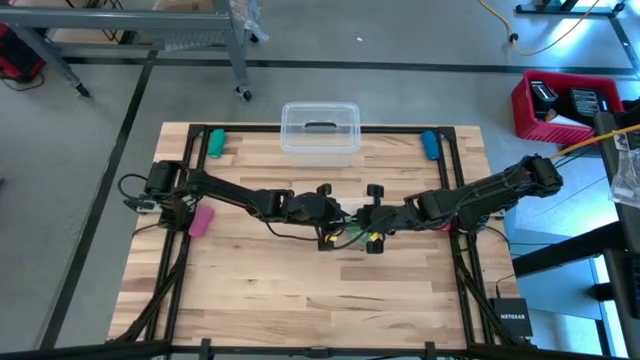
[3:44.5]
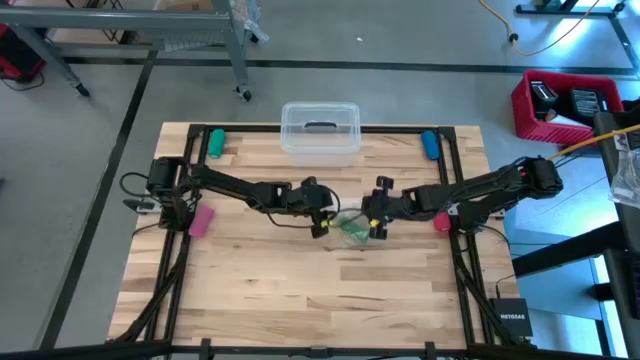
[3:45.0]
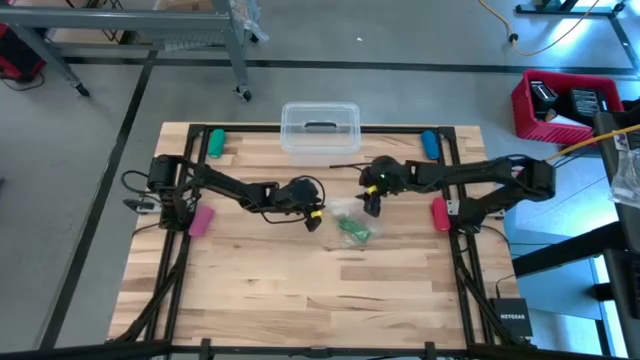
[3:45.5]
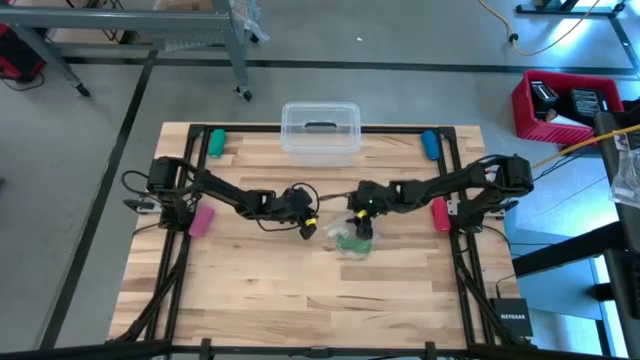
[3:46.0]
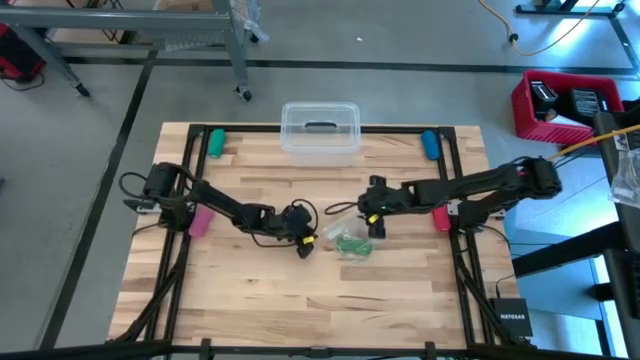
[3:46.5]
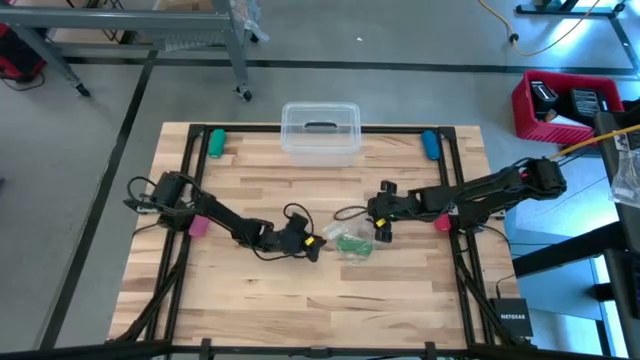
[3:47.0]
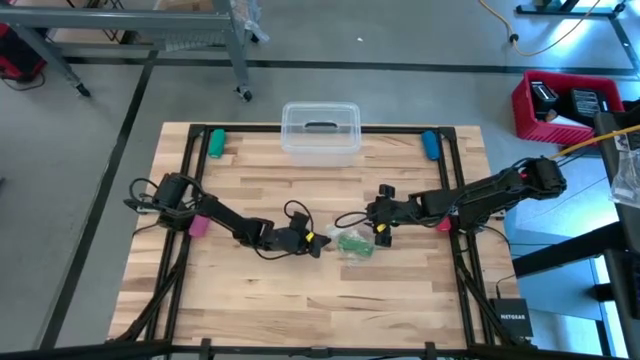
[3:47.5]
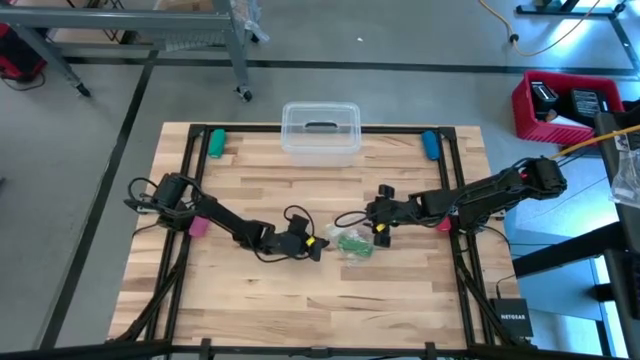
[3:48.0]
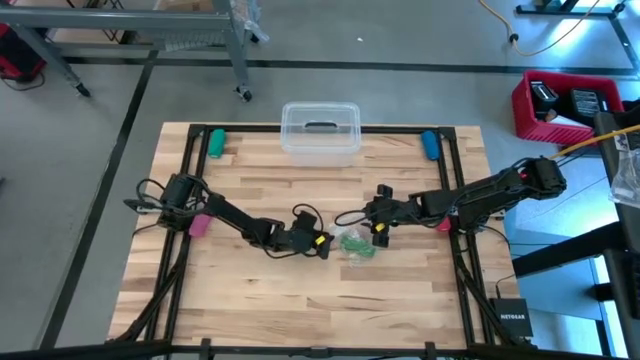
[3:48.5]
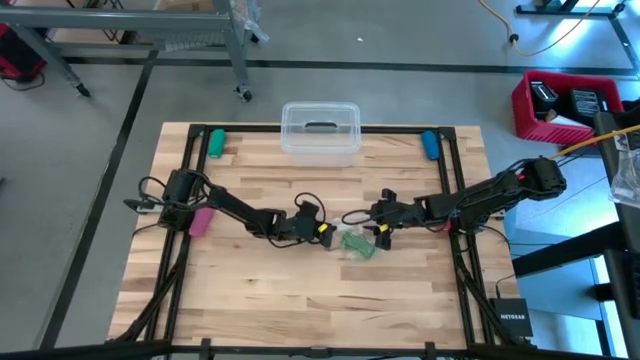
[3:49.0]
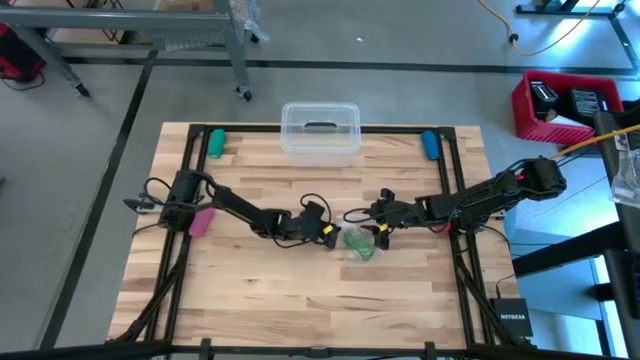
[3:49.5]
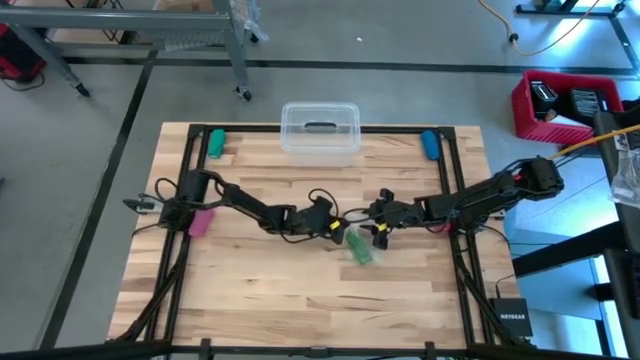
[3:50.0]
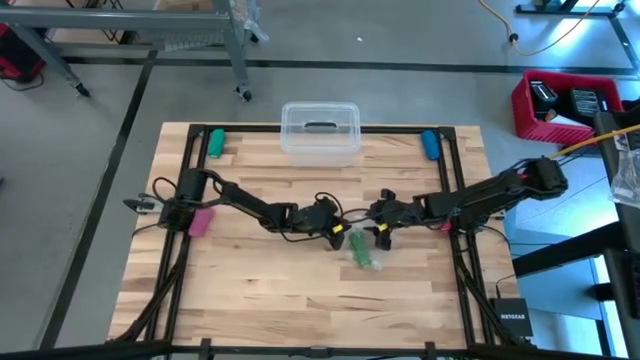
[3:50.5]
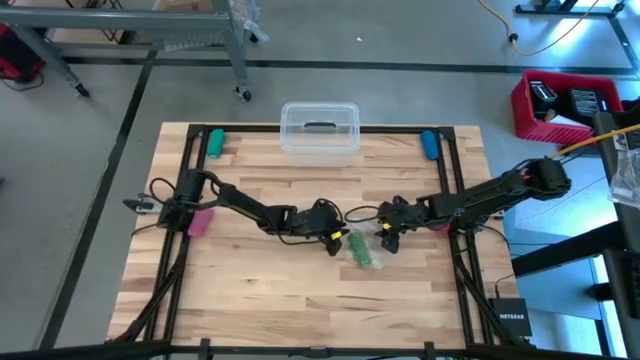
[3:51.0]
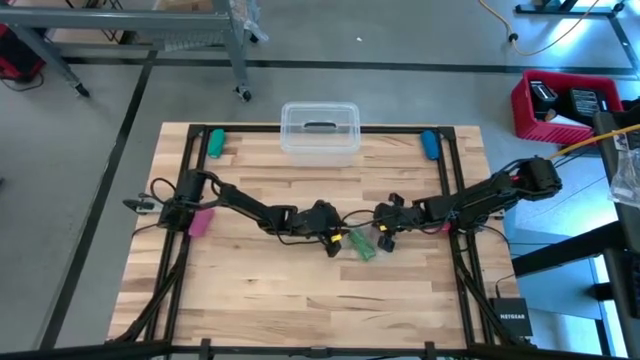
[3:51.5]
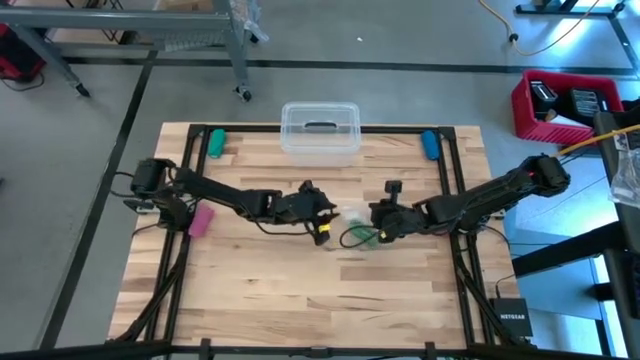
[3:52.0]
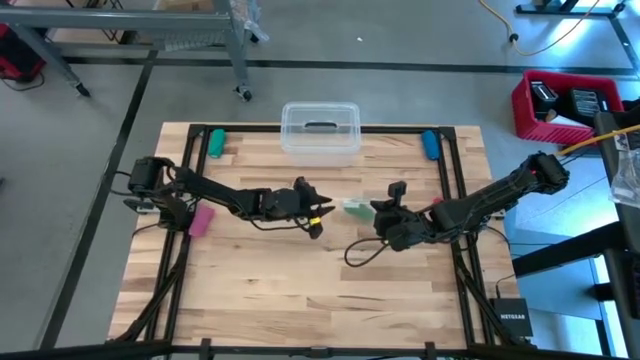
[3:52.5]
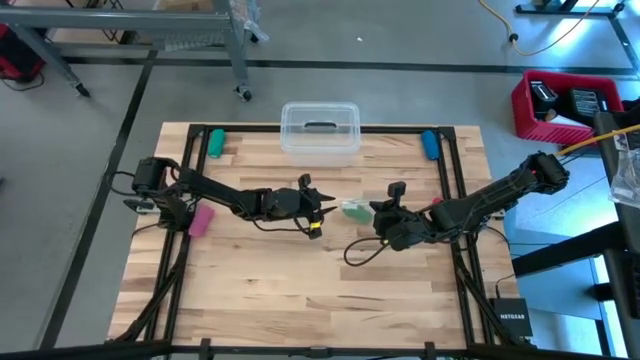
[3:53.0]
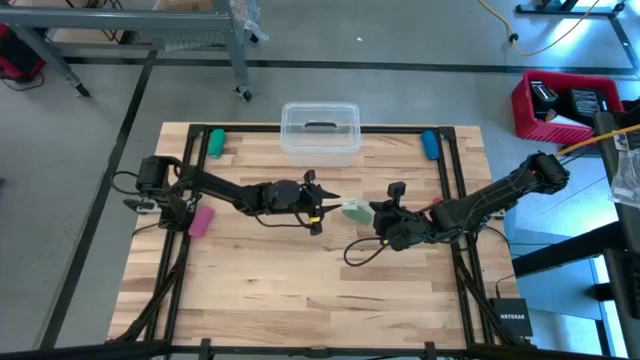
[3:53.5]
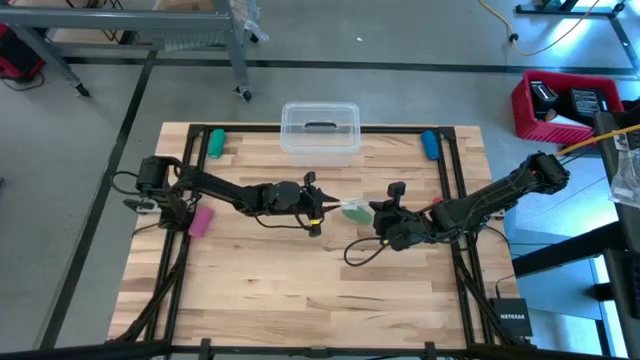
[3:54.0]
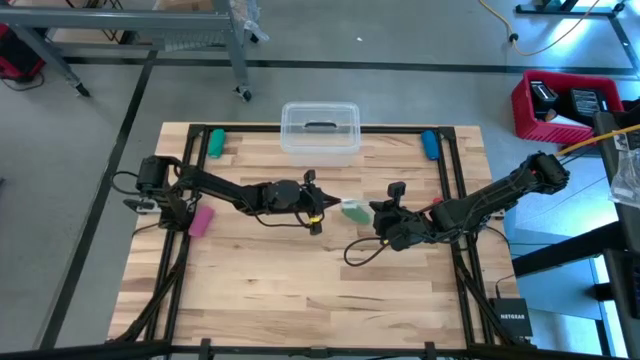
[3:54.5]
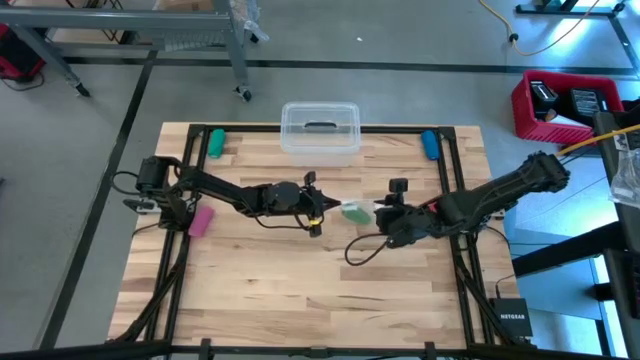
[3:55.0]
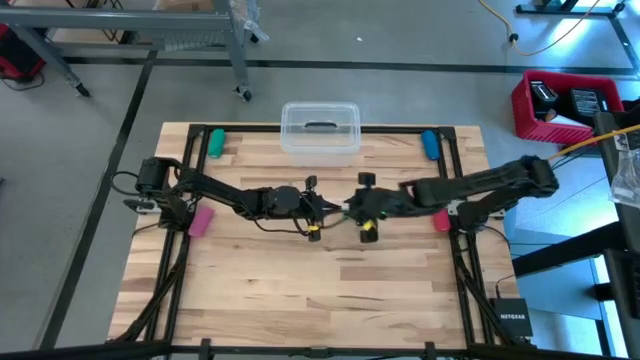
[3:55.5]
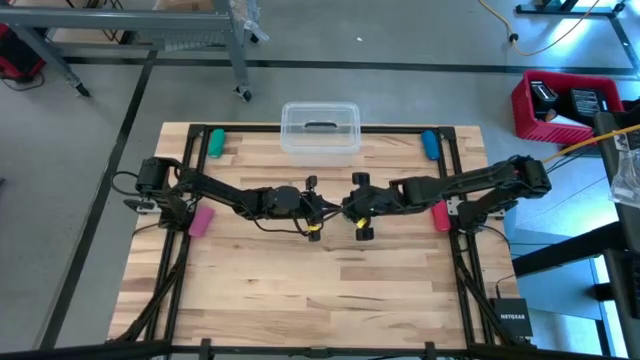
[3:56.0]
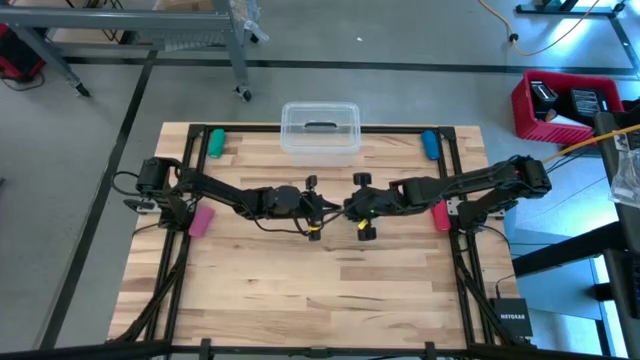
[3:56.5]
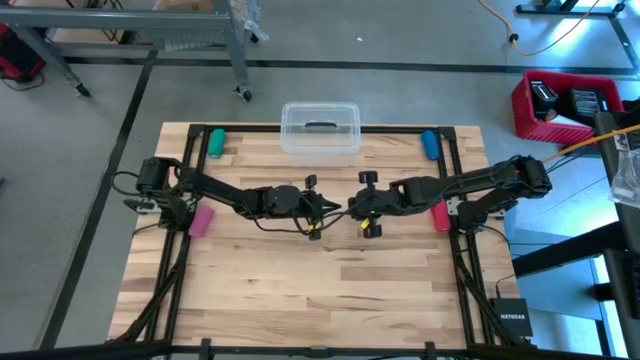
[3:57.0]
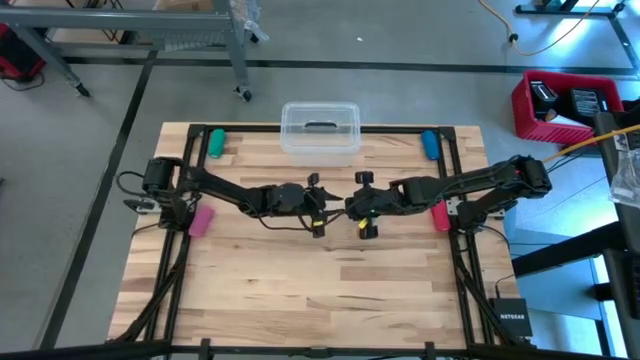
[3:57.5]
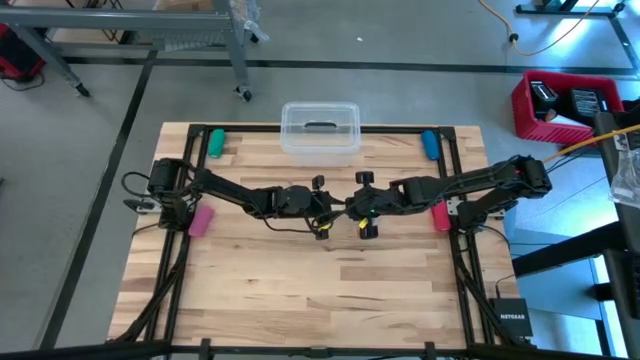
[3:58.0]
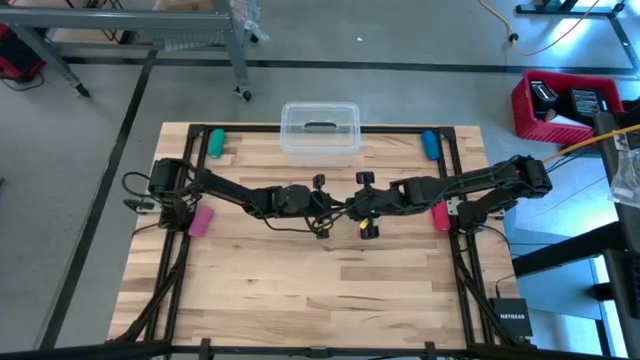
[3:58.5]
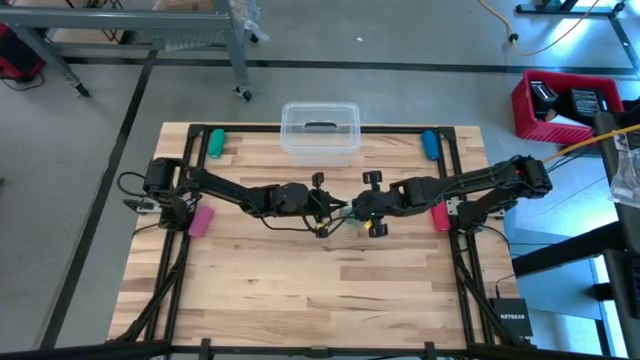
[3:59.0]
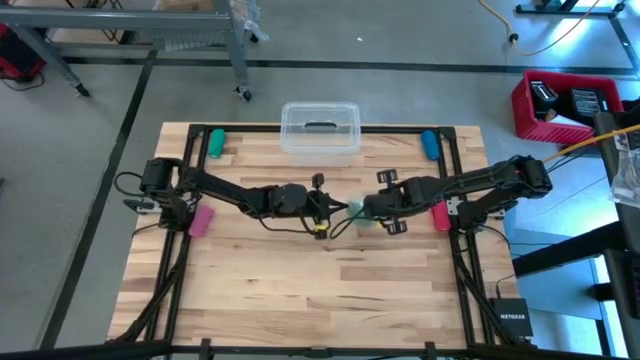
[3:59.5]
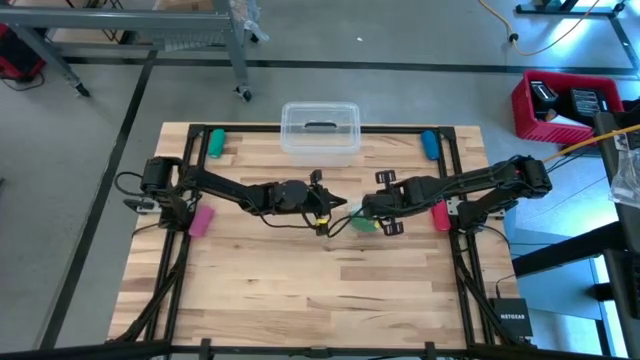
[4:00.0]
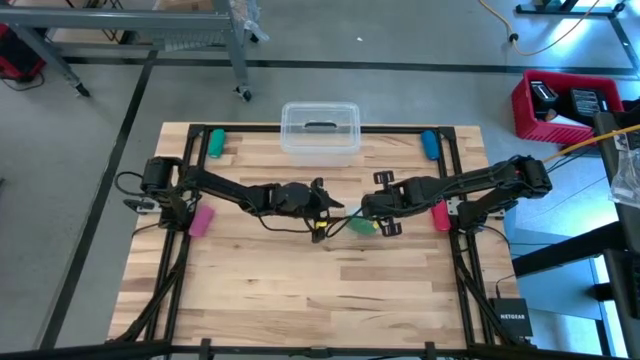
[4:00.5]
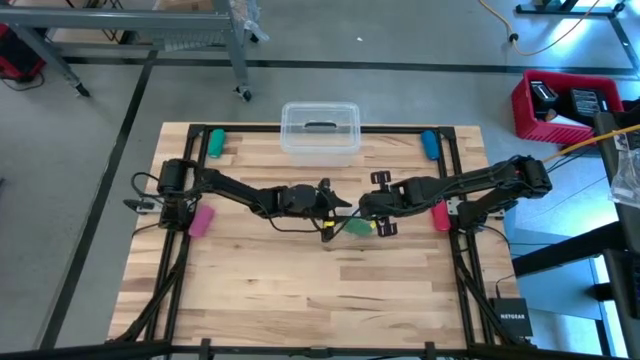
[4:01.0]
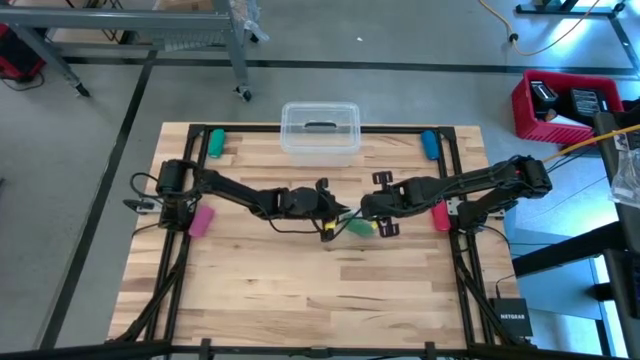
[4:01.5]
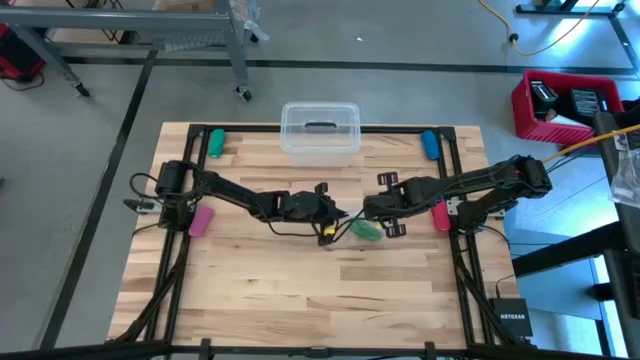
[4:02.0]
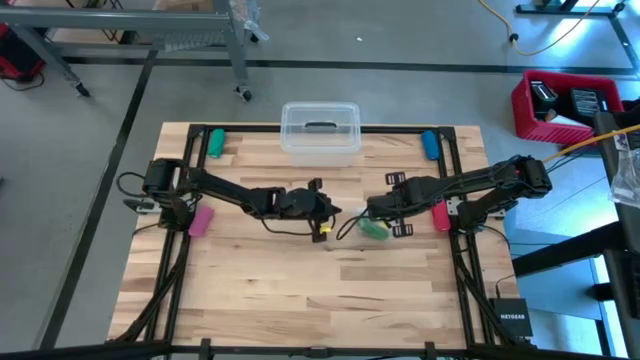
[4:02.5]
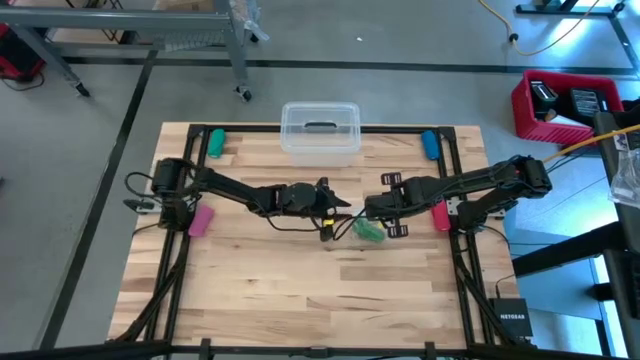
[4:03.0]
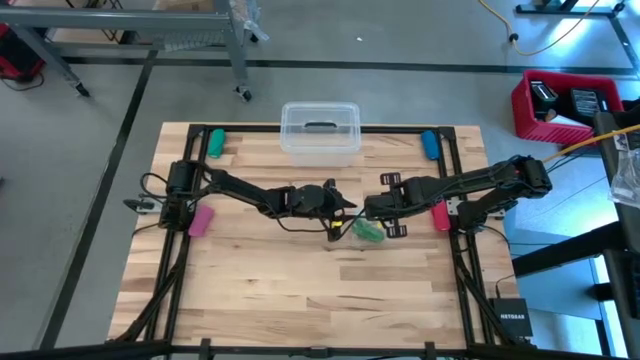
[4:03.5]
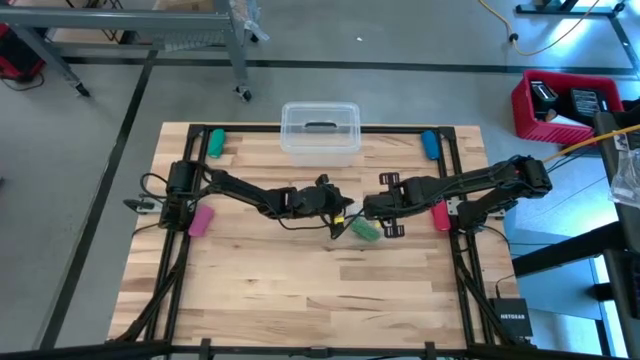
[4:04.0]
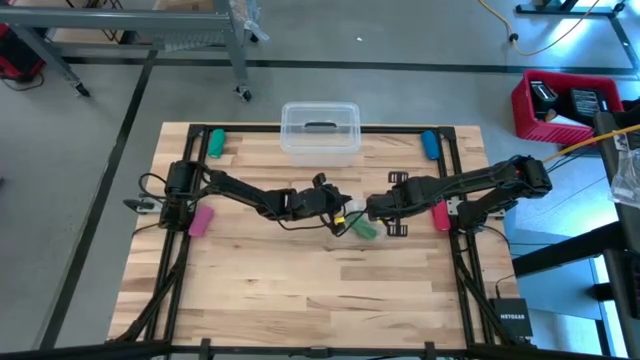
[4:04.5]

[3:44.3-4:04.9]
Task: Roll bandage
Close the transparent zip bag

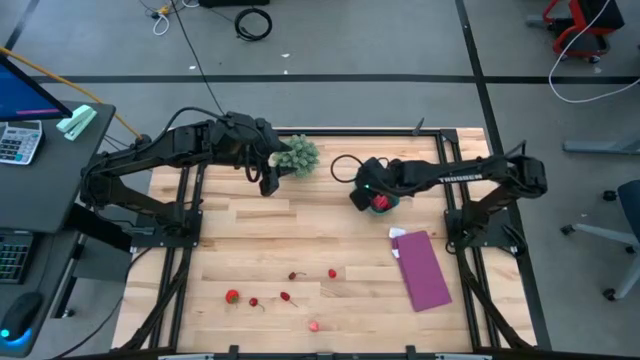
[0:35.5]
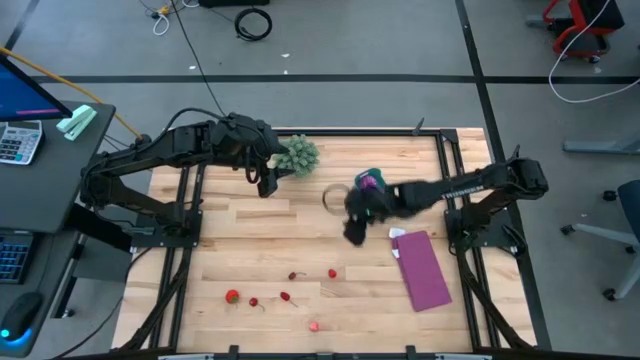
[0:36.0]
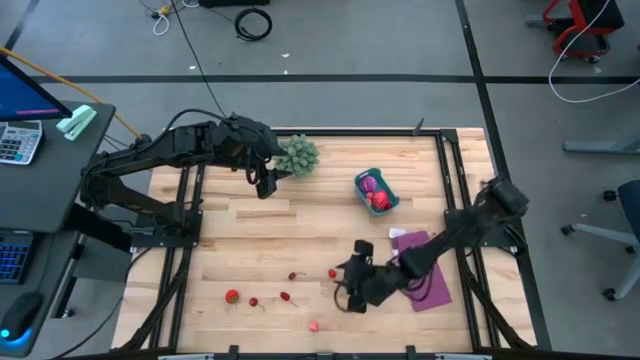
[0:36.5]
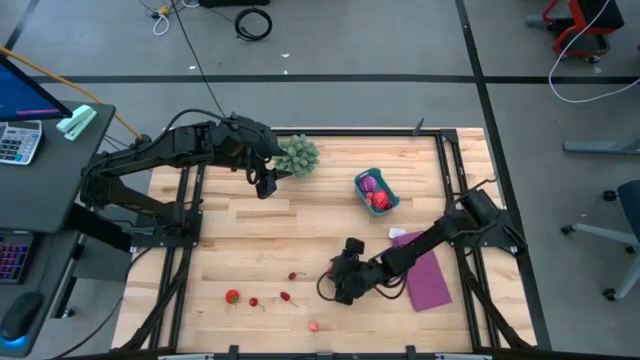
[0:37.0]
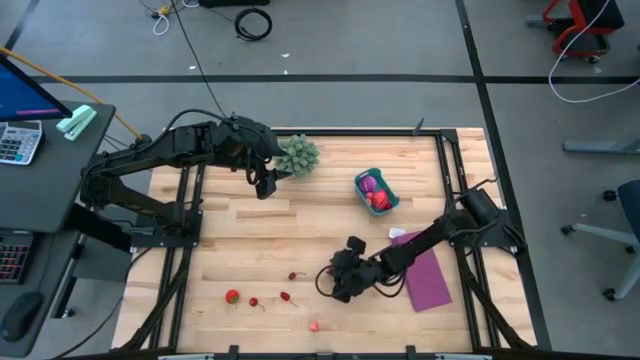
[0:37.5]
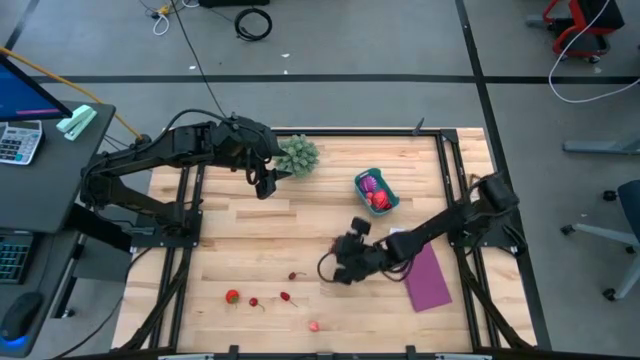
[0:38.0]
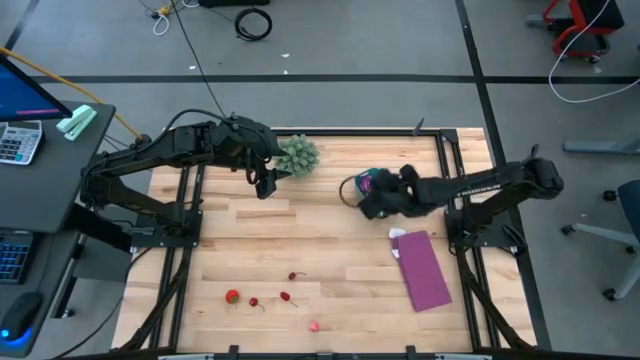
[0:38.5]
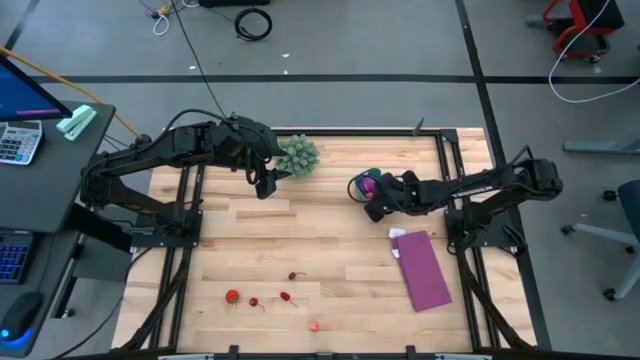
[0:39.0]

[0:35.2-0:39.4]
Task: Pick and placing Produce into tupperware
Put the red raspberry into the blue bin
